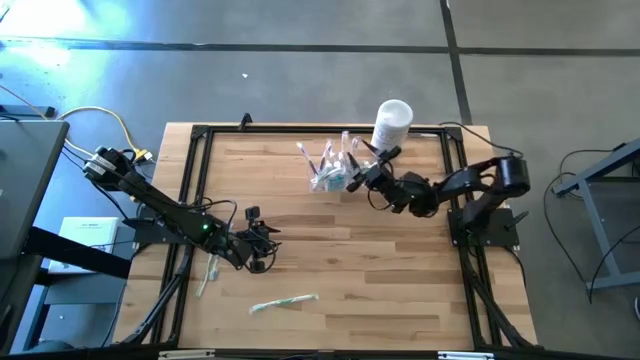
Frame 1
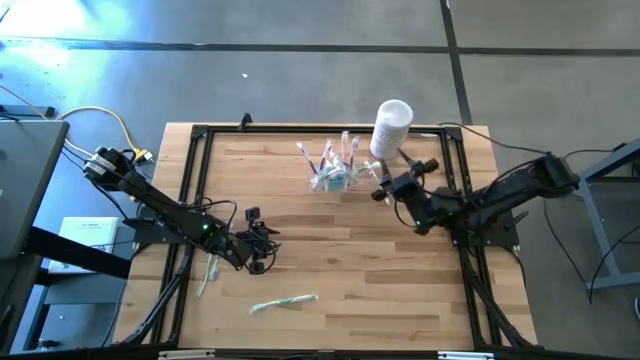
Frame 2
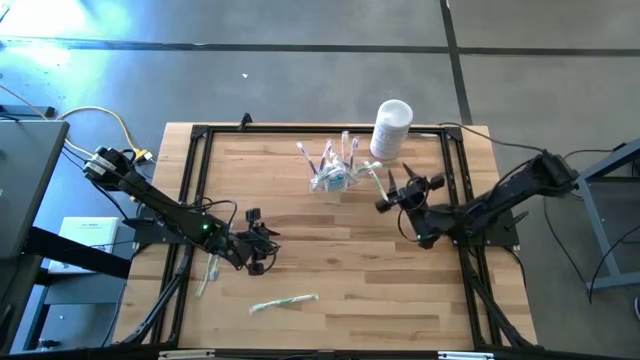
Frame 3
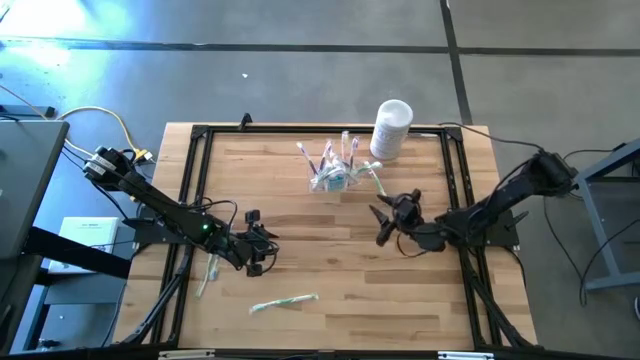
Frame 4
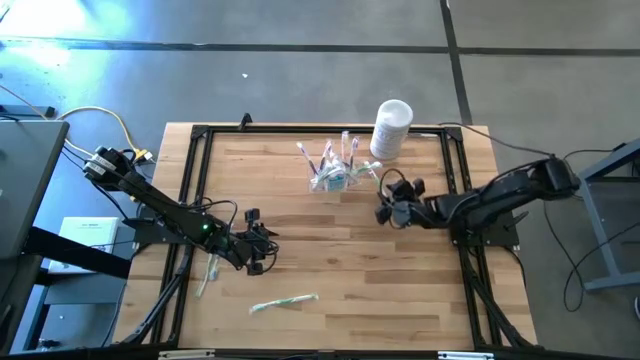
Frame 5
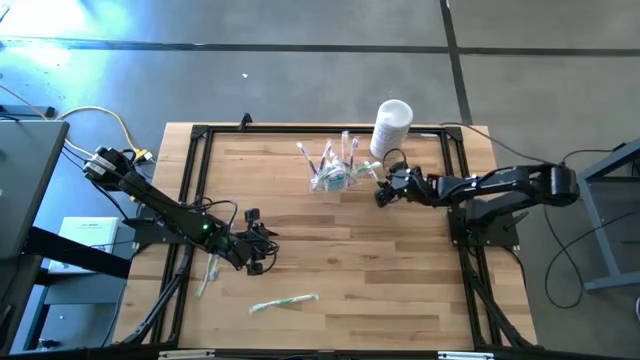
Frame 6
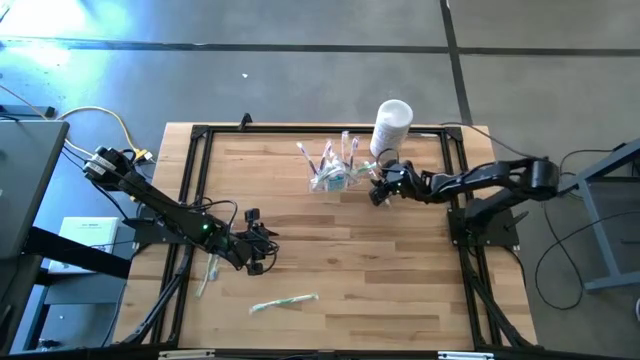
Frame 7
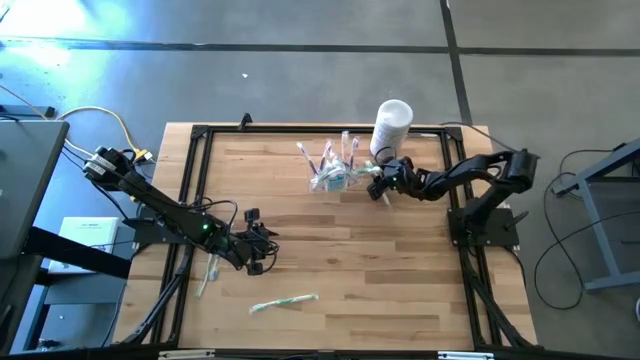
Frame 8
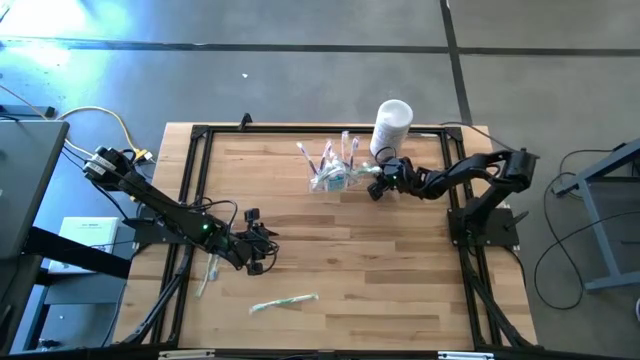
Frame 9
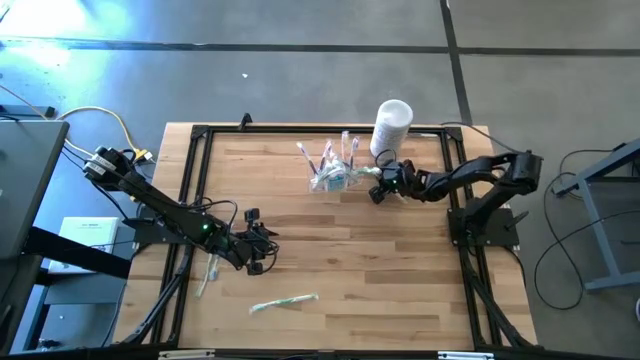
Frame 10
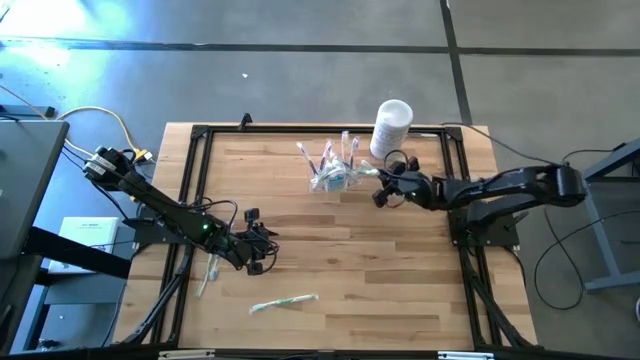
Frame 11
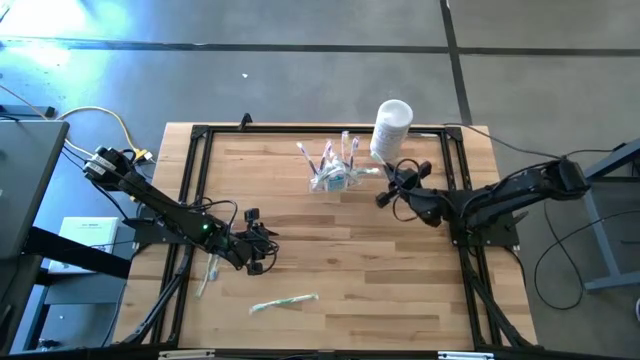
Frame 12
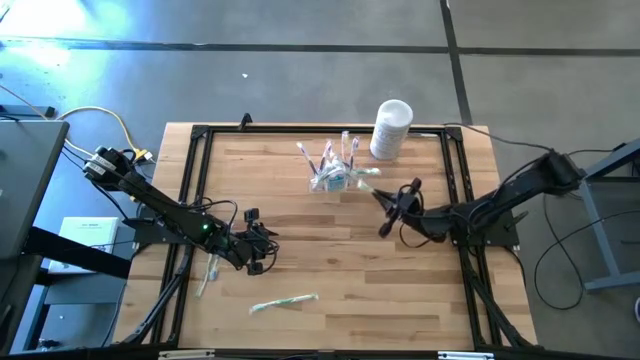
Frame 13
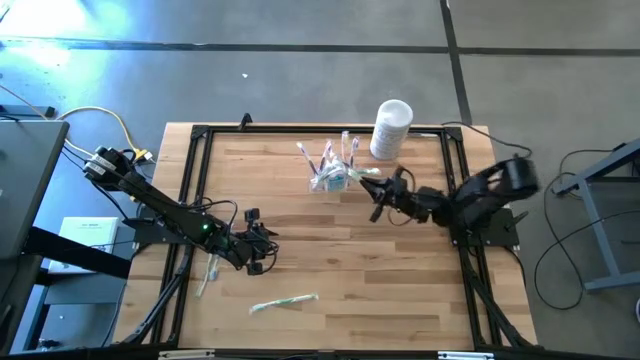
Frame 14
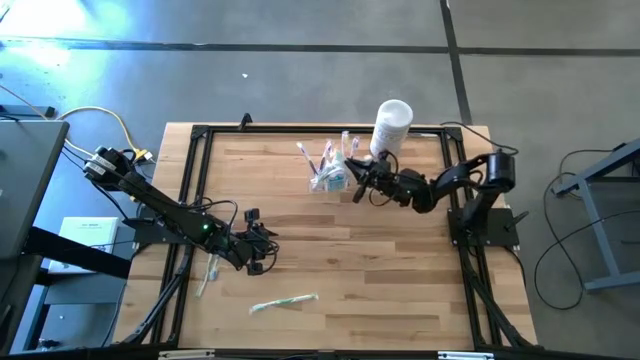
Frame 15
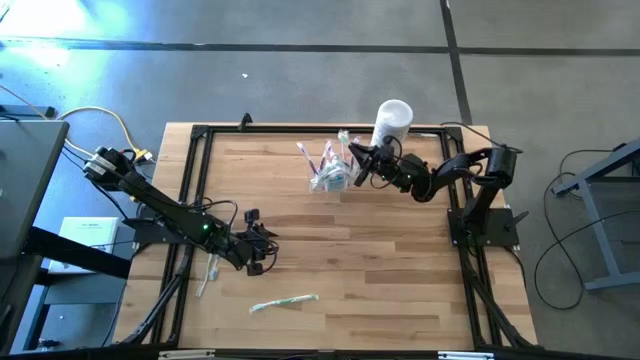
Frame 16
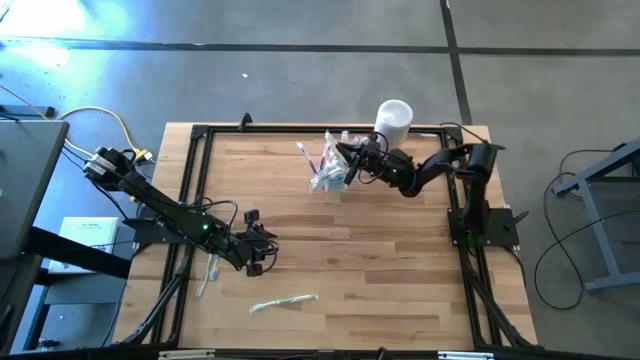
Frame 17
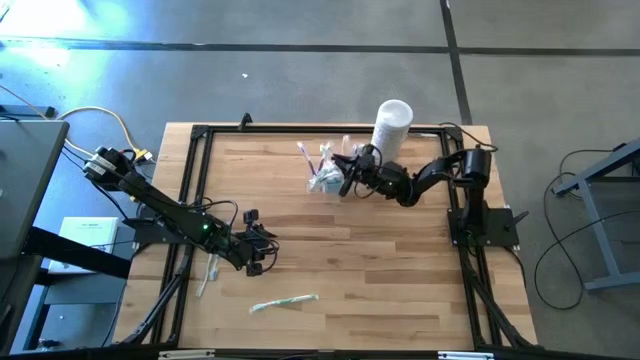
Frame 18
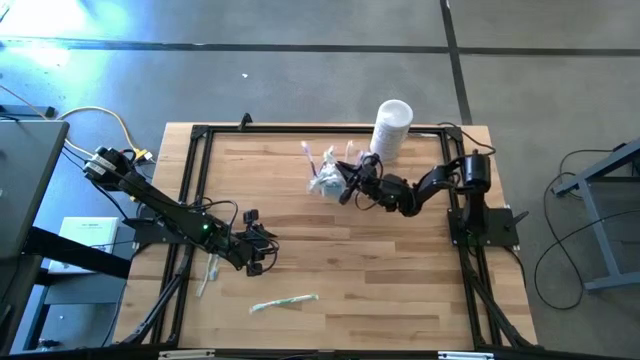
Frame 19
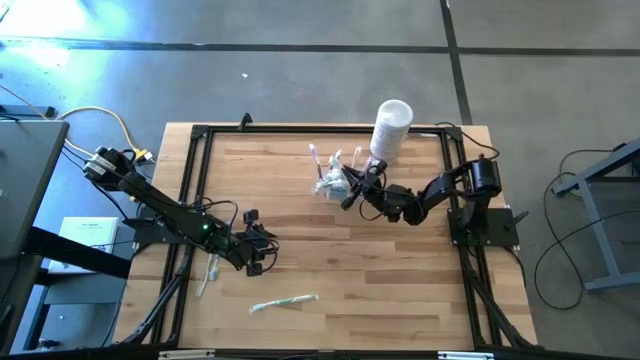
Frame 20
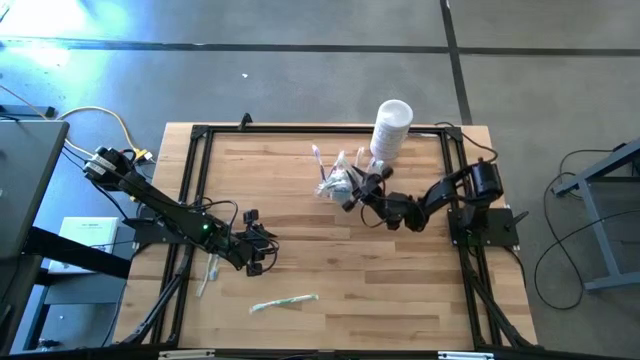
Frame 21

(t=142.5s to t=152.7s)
Task: Pick & Place toothbrushing station
Put the top green toothbrush into the transparent organizer

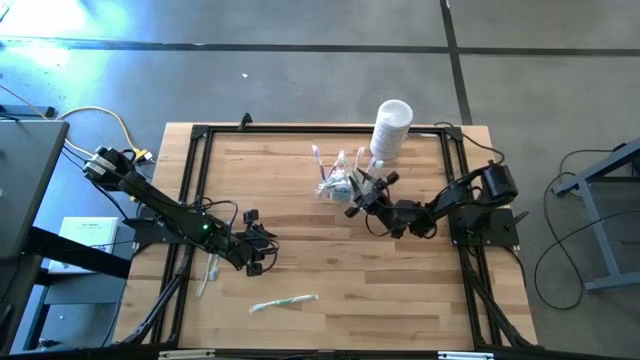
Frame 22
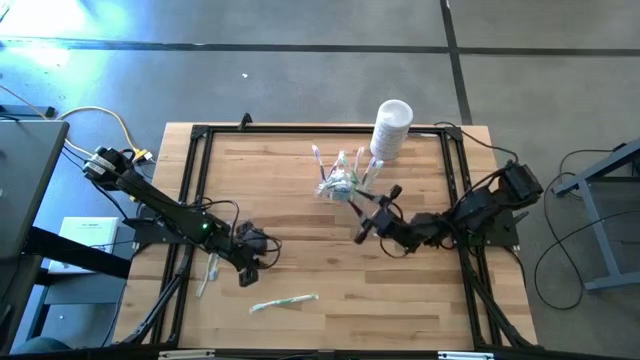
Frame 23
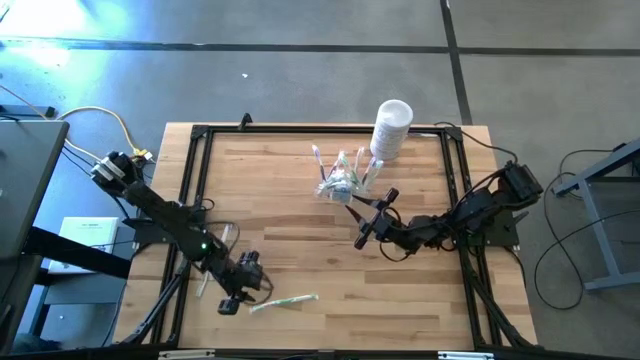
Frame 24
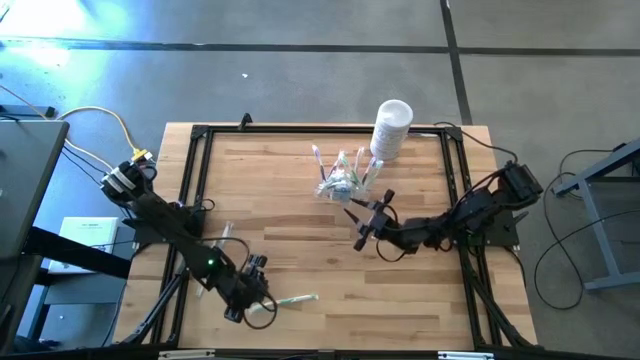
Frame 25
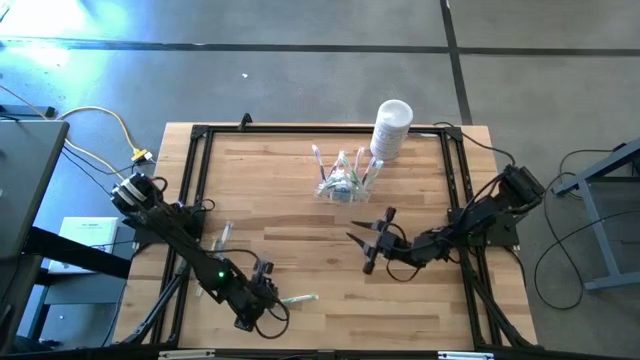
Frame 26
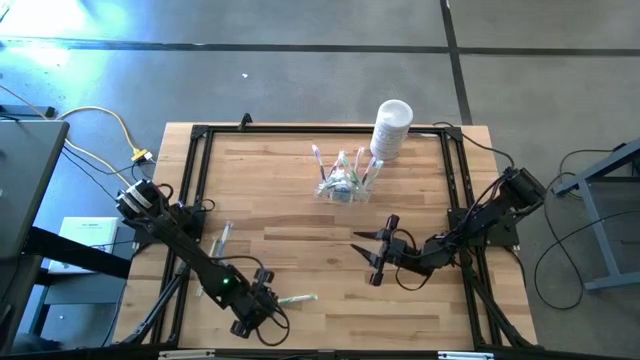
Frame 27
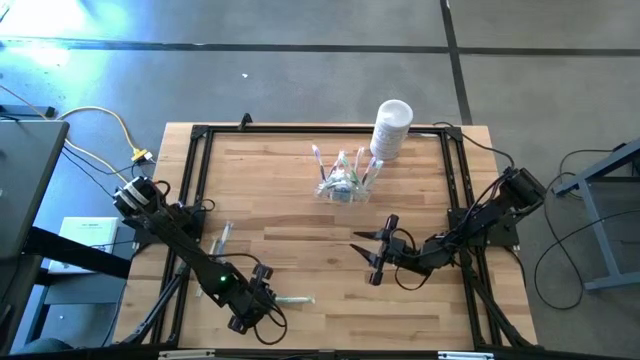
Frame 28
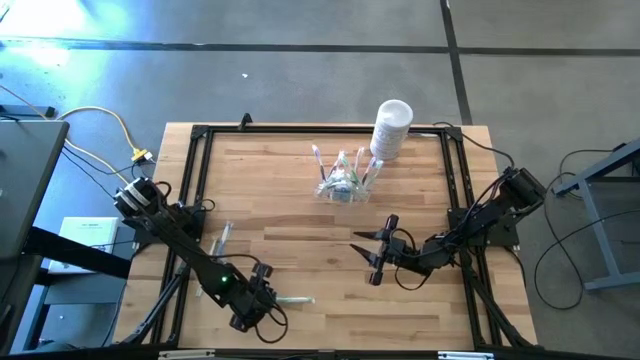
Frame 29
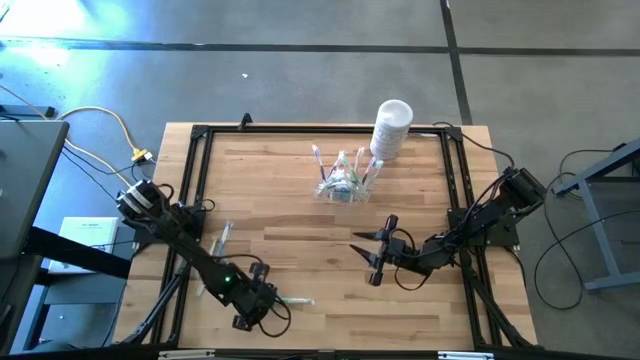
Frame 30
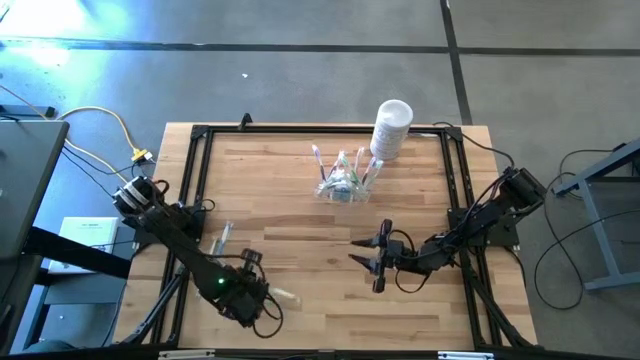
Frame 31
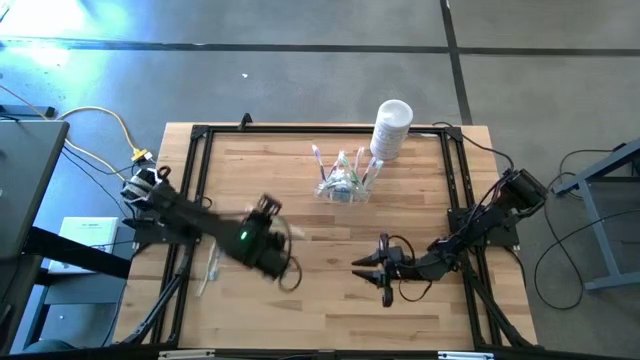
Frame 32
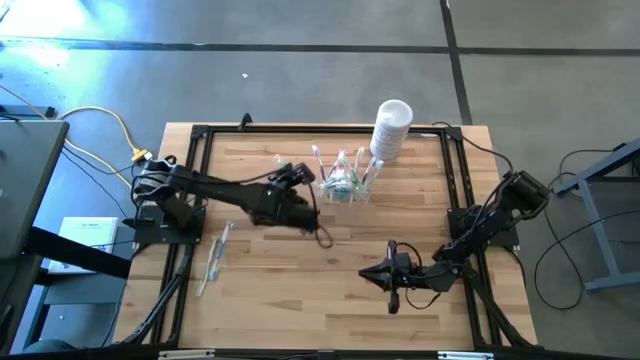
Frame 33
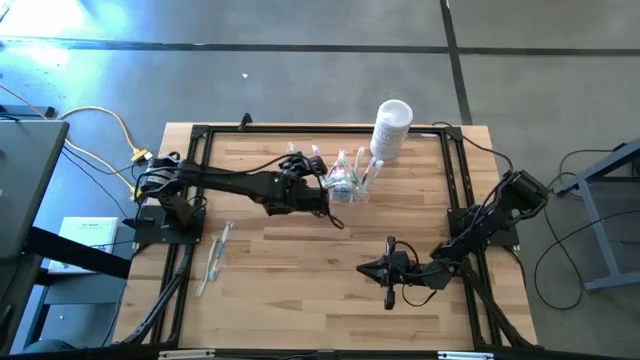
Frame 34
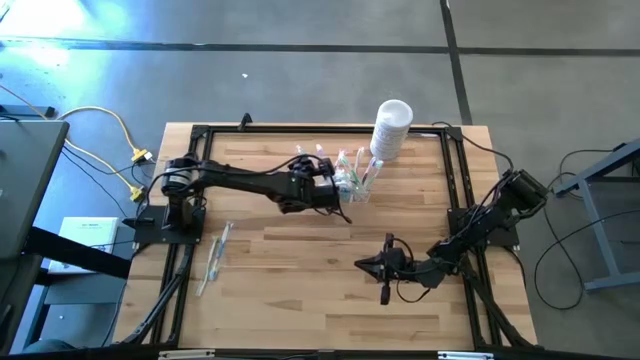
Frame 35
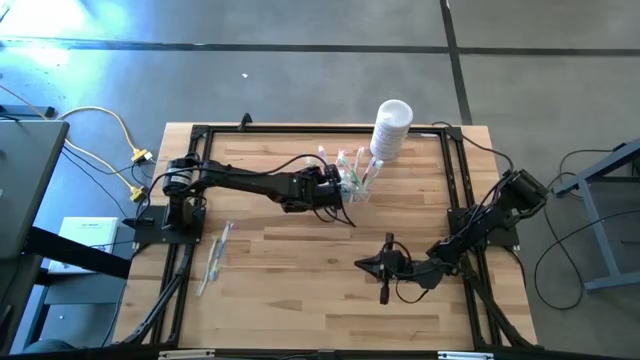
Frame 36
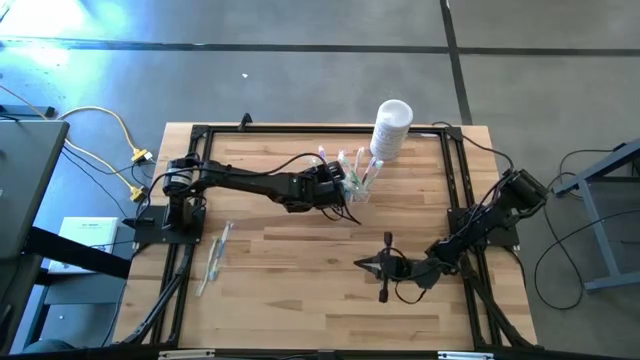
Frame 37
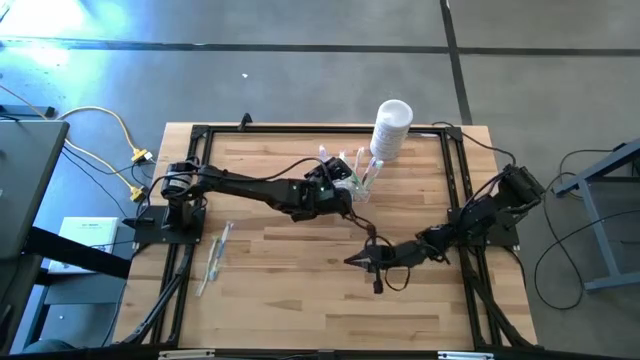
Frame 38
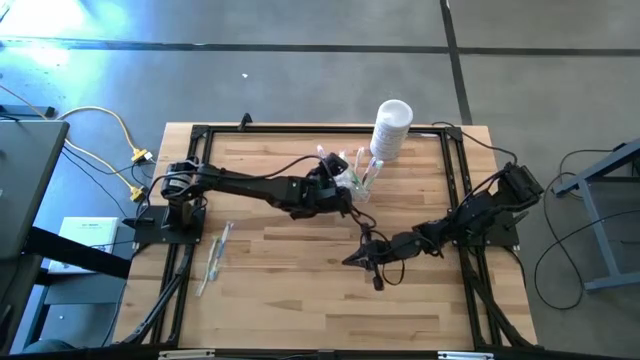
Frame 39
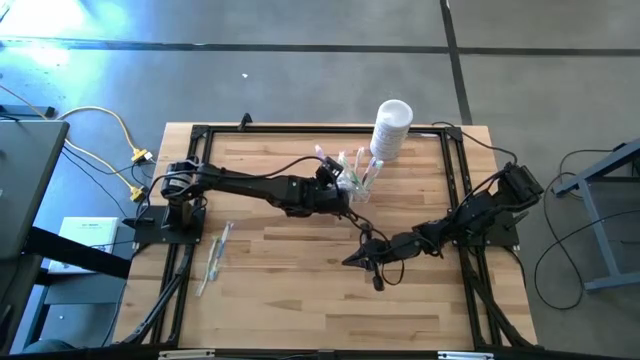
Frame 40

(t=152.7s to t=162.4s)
Put the bottom green toothbrush into the transparent organizer
